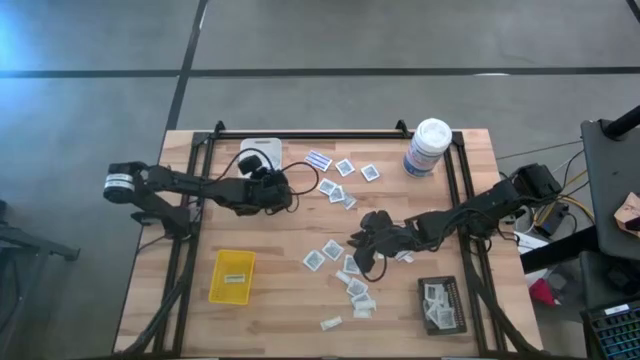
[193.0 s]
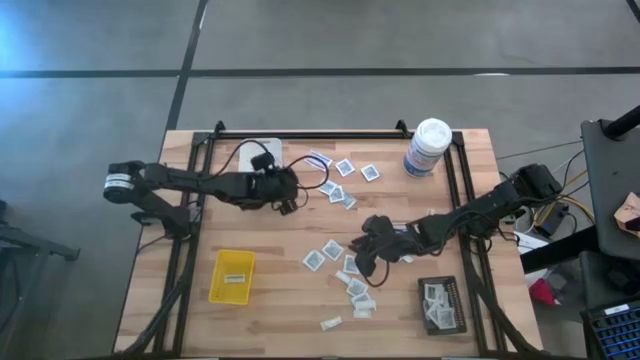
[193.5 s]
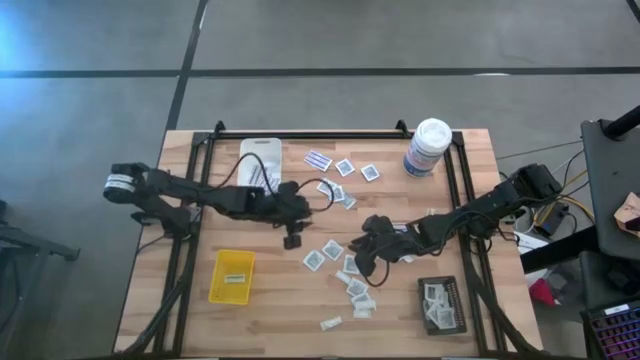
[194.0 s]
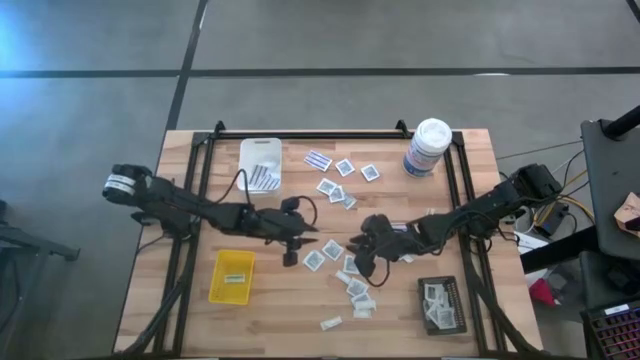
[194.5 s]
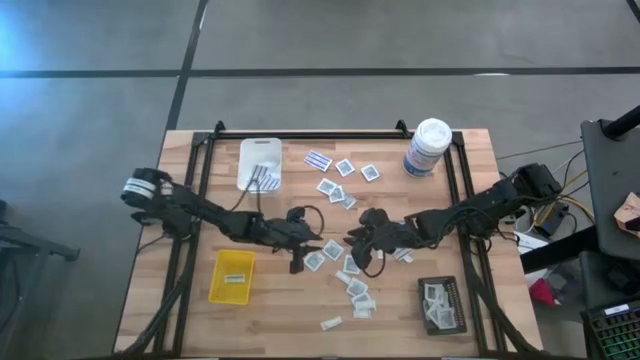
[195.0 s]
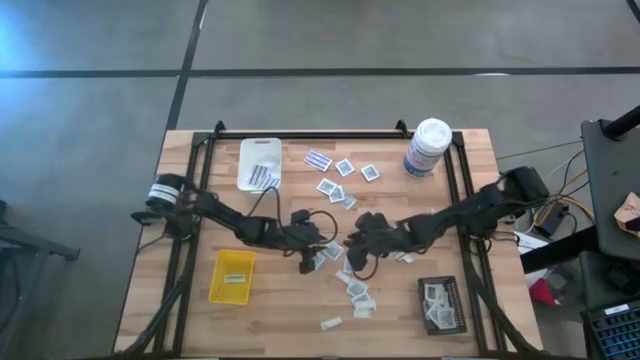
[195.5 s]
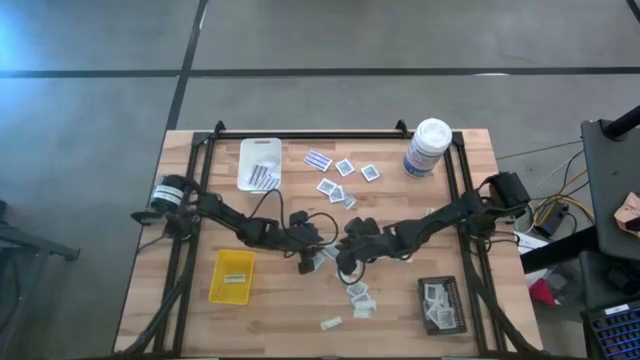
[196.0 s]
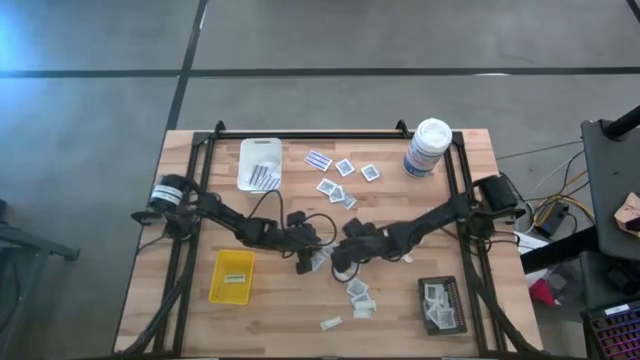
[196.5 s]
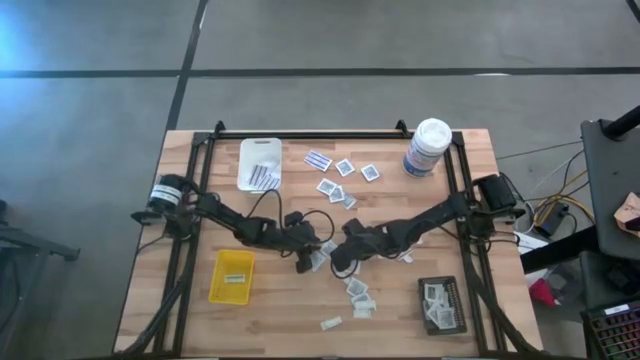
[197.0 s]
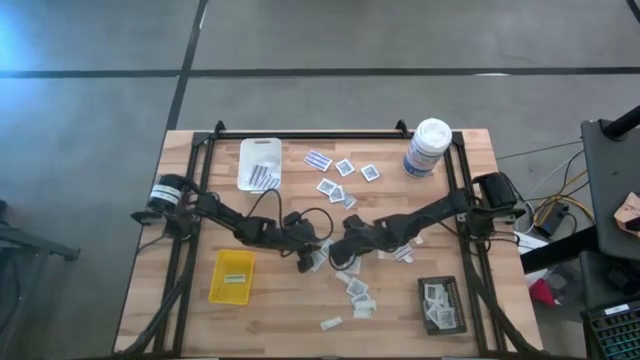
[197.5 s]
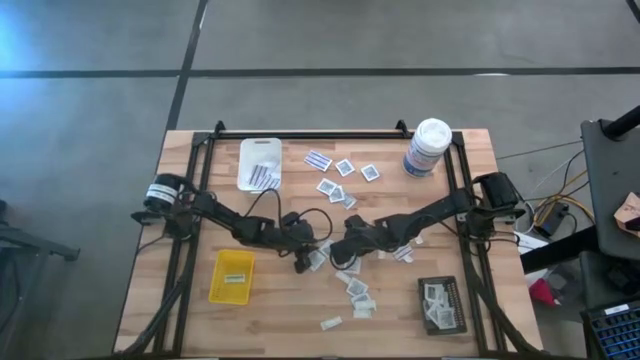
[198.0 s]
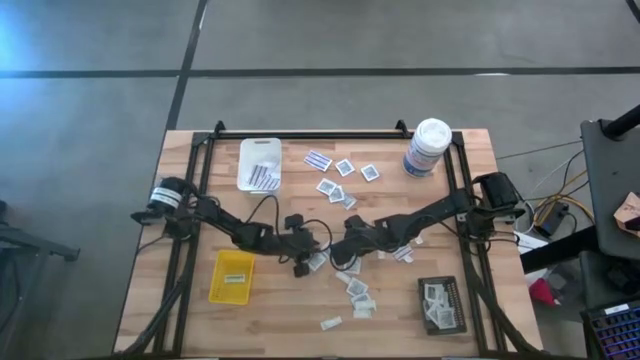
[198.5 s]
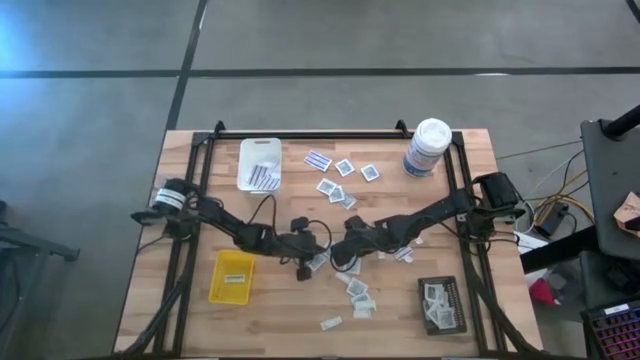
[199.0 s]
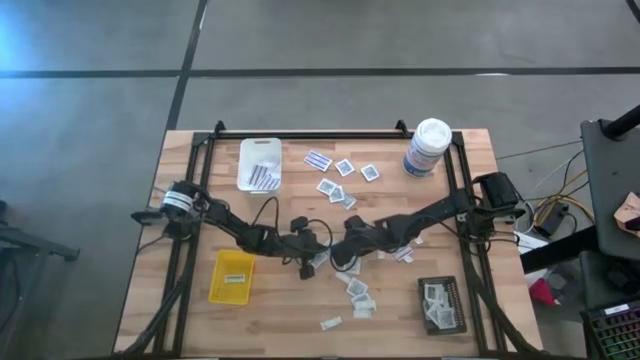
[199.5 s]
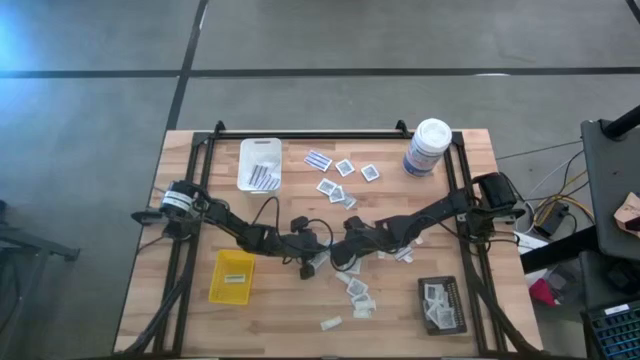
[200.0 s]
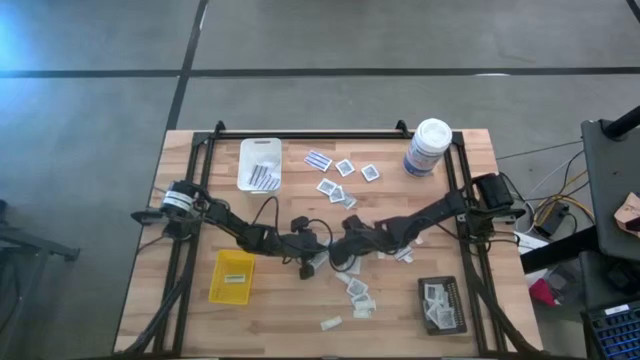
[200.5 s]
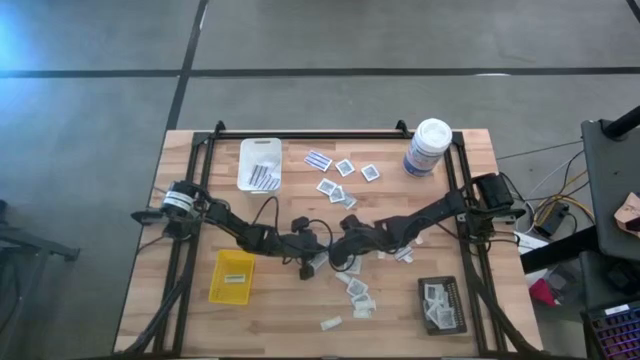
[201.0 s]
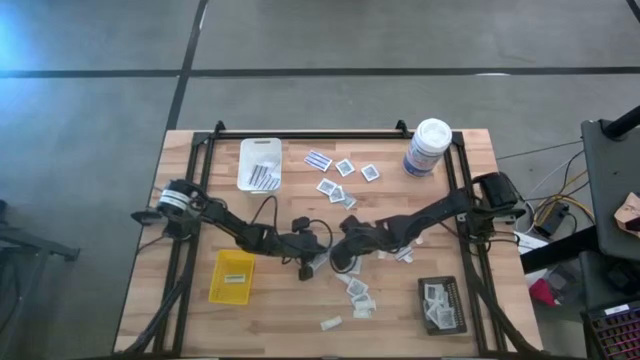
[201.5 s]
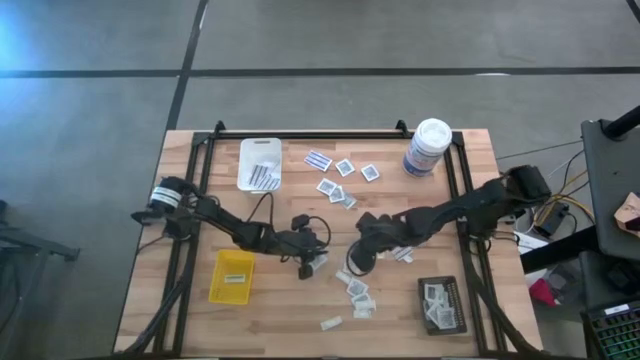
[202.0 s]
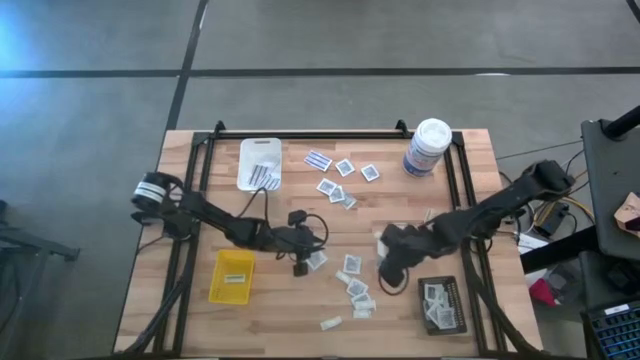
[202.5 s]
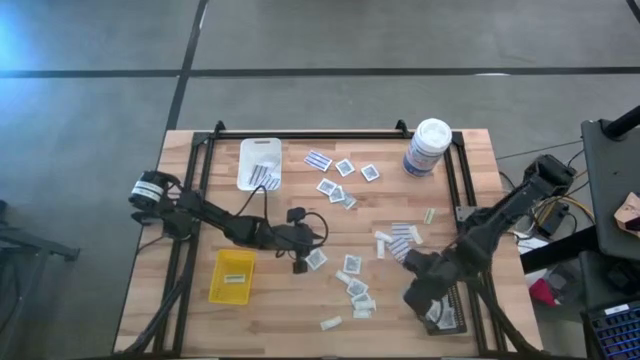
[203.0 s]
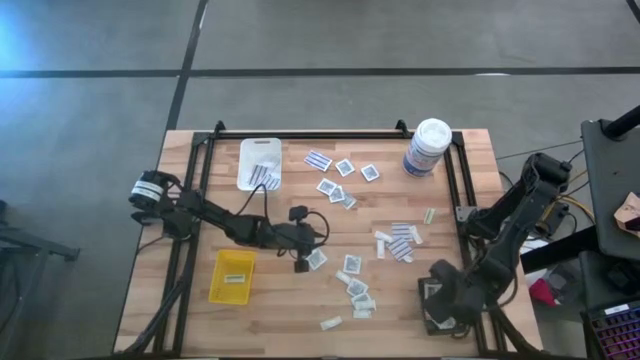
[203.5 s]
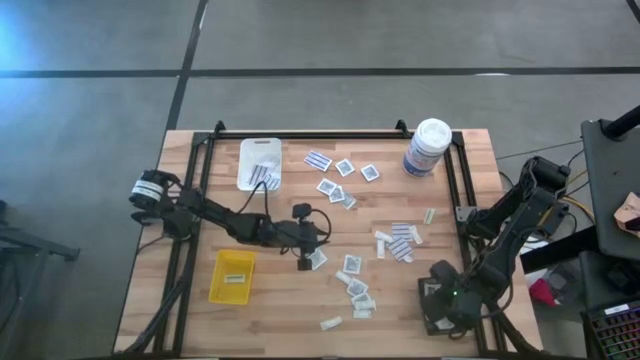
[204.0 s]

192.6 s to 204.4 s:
Task: Pick & Place First Aid Supplies
Put the towelette pack into the black bin

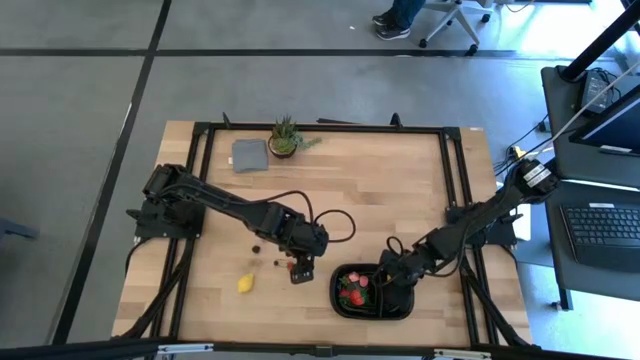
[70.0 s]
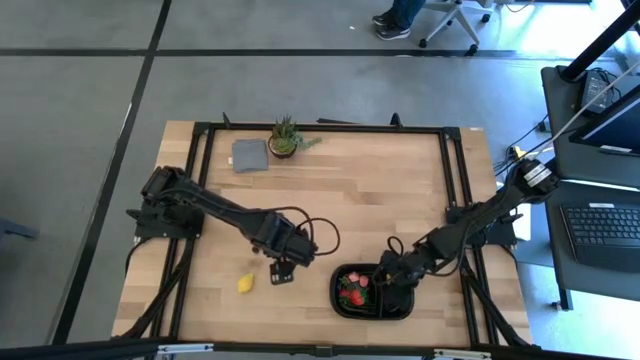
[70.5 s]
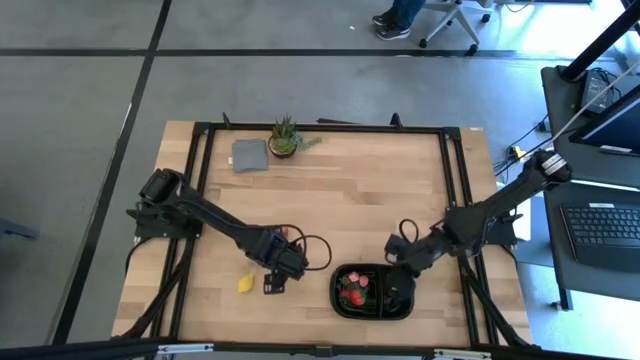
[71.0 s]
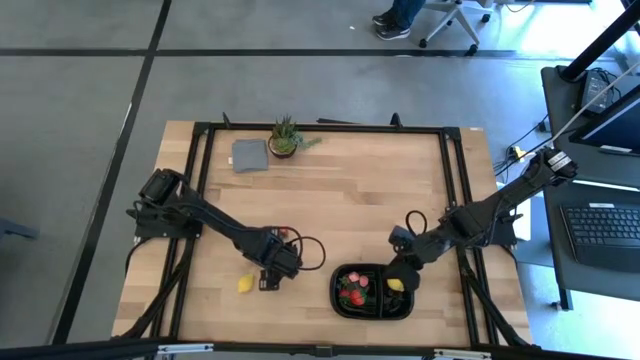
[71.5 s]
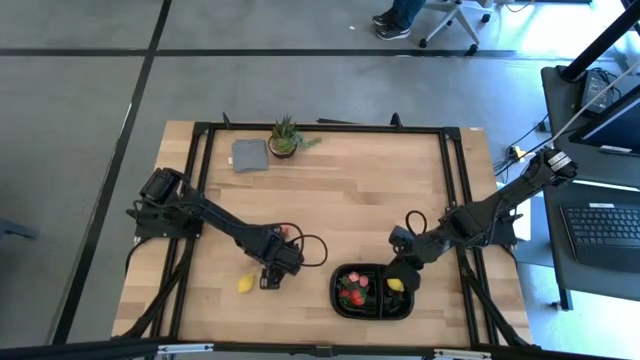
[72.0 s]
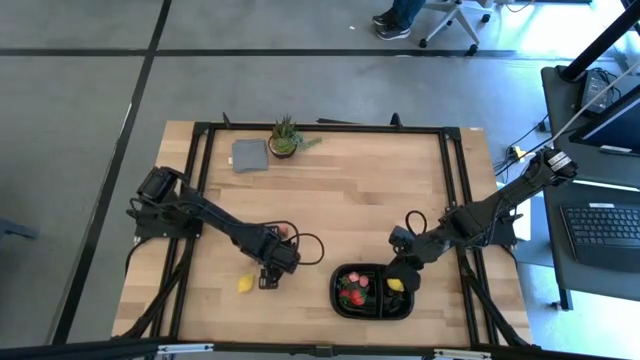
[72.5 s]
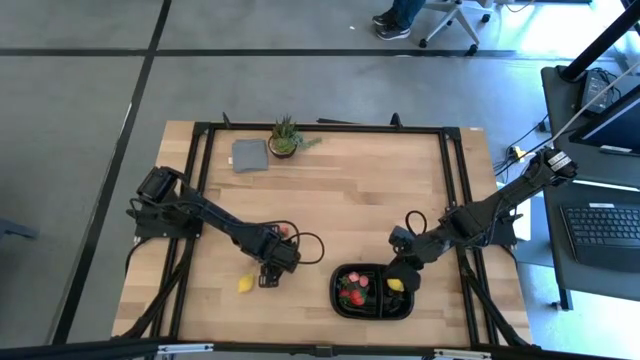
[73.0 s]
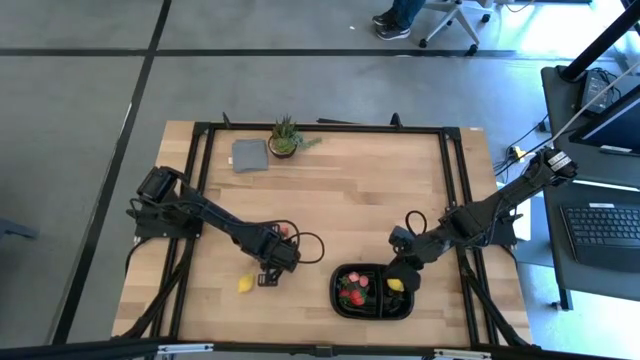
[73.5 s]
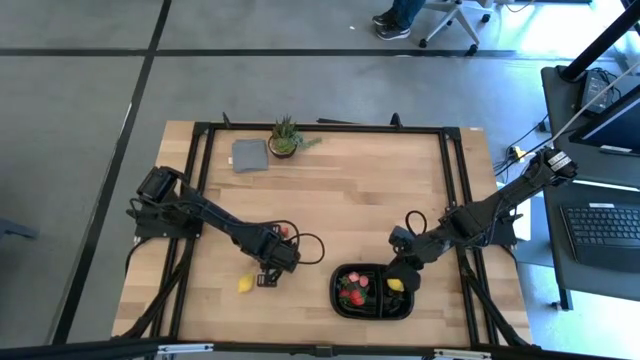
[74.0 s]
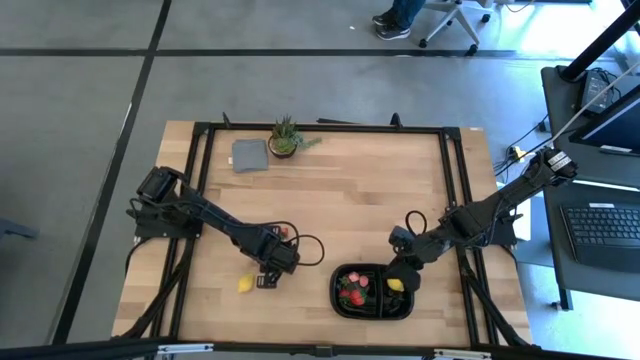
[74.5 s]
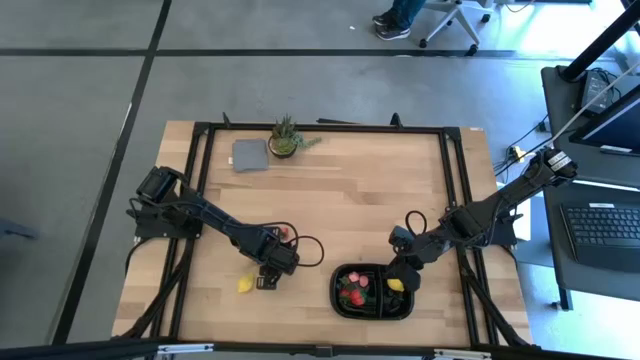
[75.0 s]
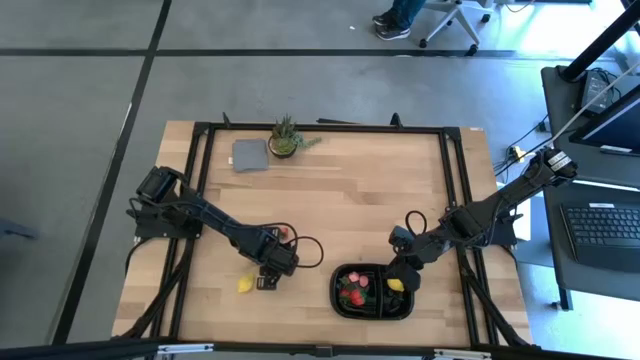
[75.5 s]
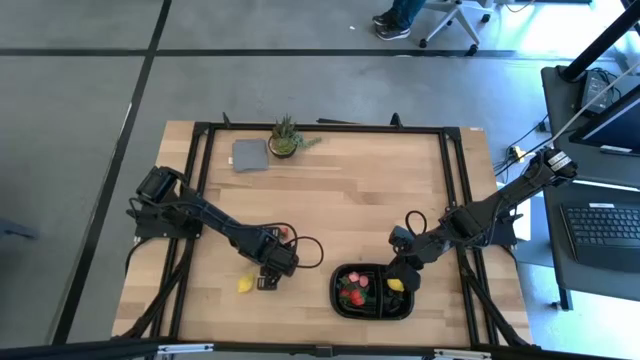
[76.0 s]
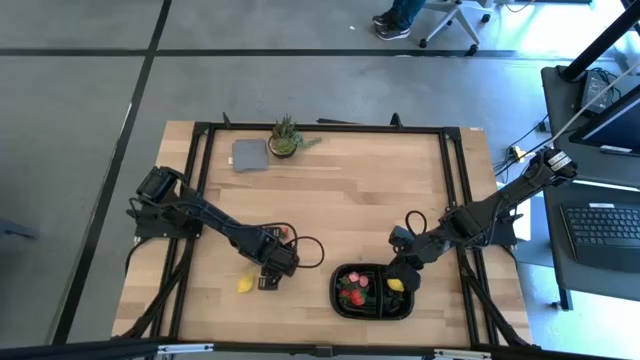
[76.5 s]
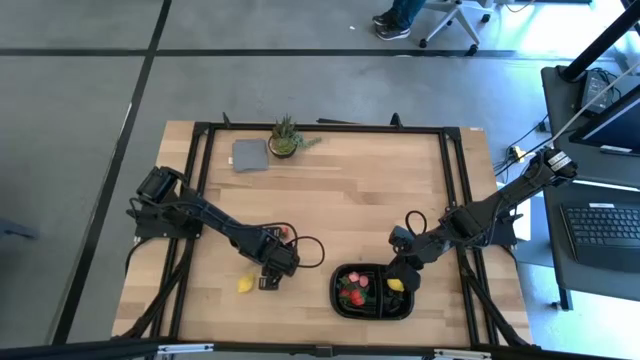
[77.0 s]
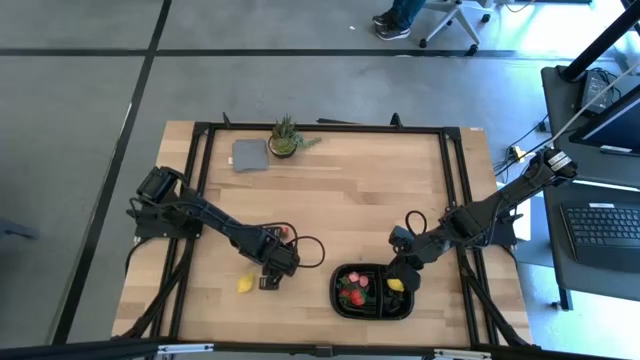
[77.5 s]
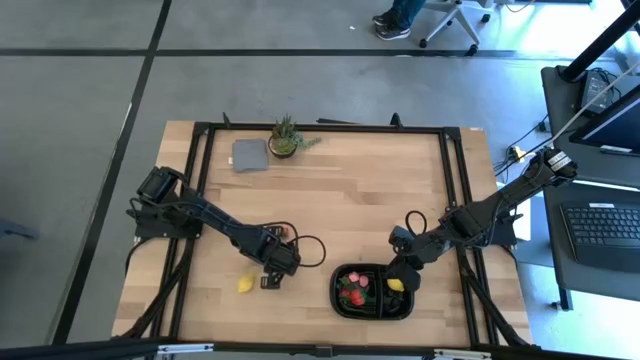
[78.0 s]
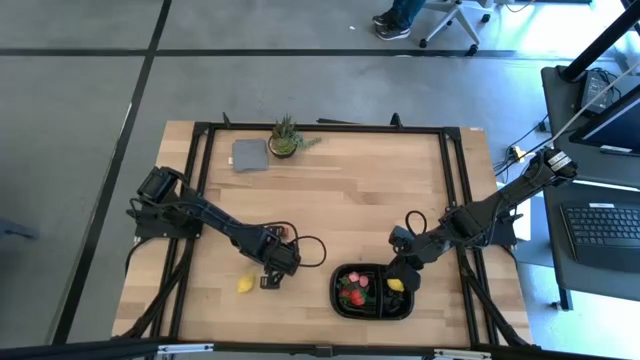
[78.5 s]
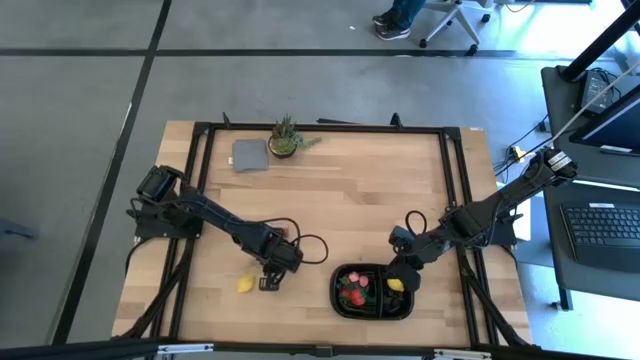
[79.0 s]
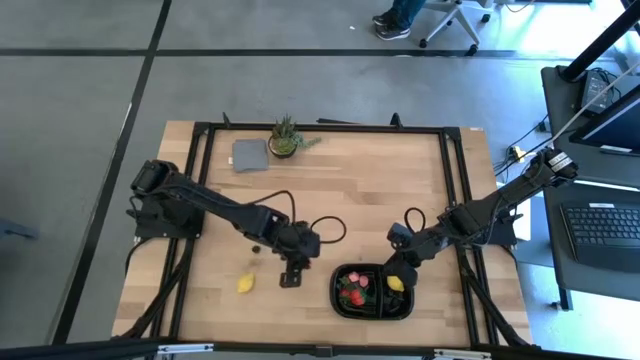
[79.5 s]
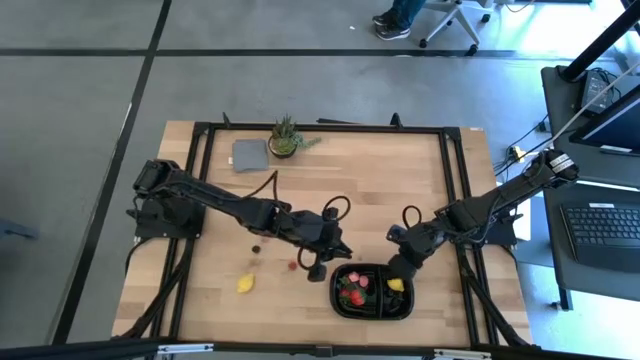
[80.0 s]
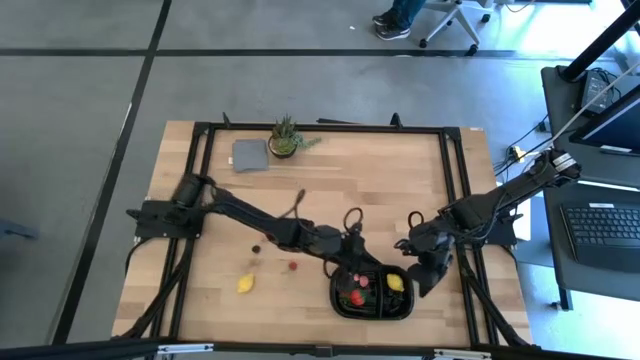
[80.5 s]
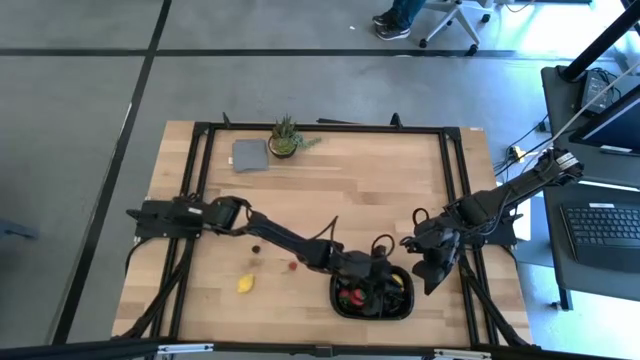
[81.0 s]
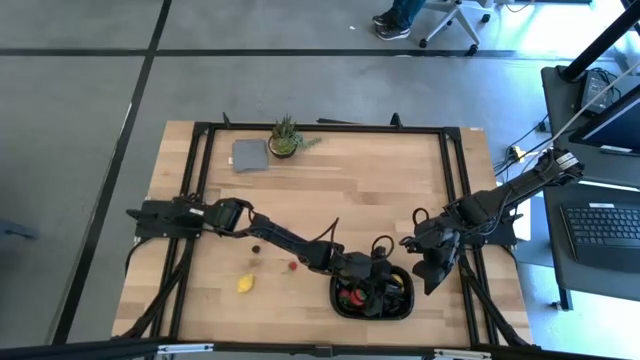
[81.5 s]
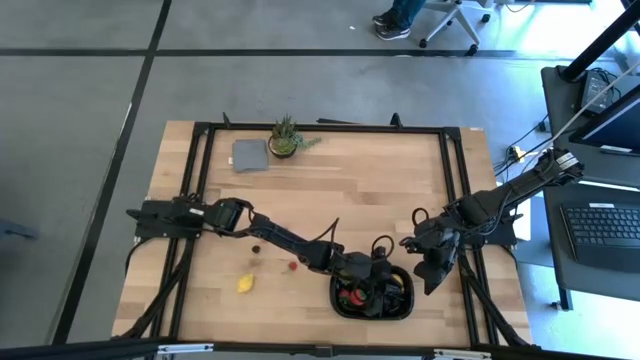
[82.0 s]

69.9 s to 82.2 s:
Task: Pick and placing Produce into tupperware
Put the blue blueberry into the black bin
